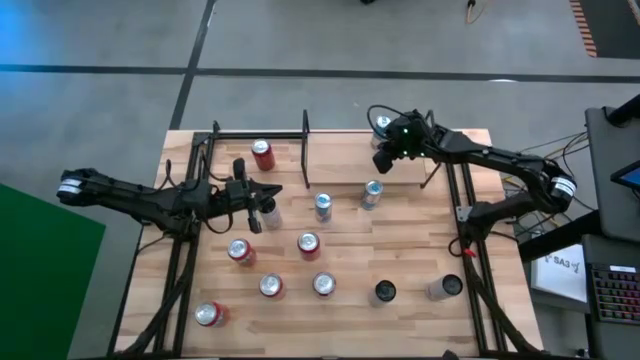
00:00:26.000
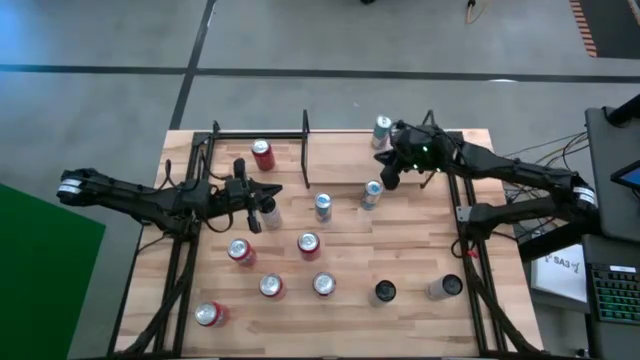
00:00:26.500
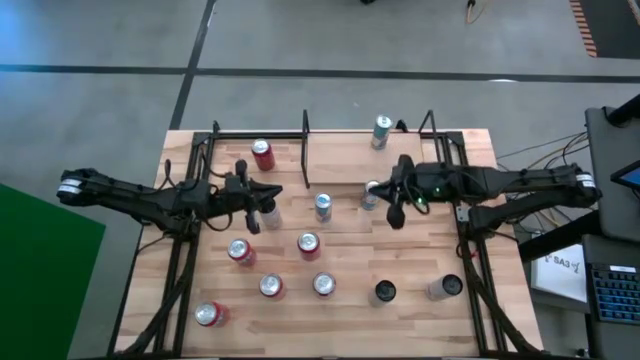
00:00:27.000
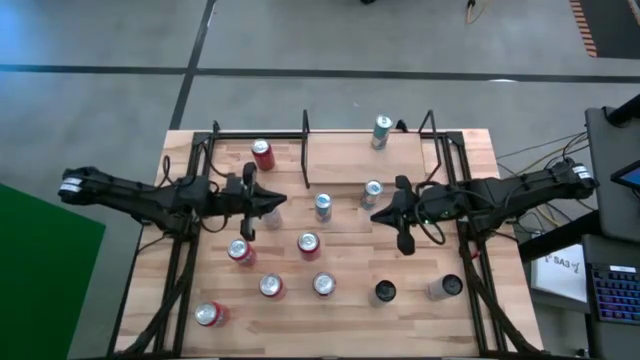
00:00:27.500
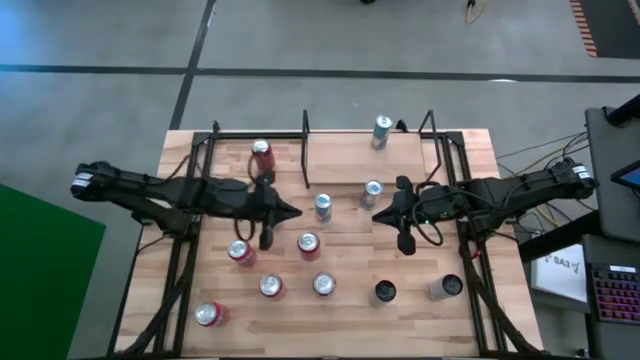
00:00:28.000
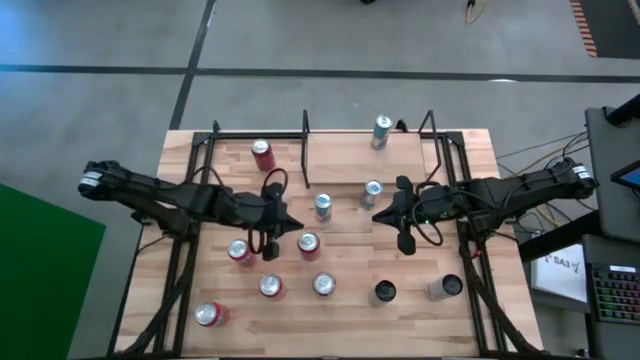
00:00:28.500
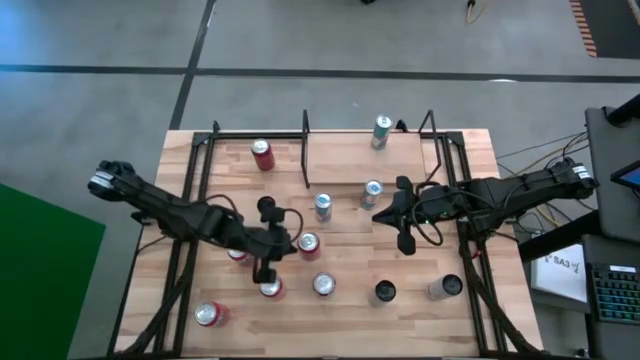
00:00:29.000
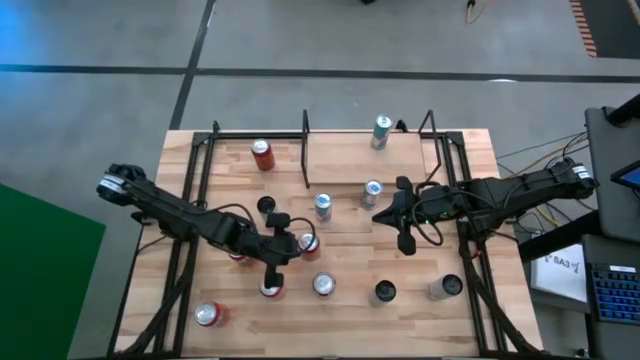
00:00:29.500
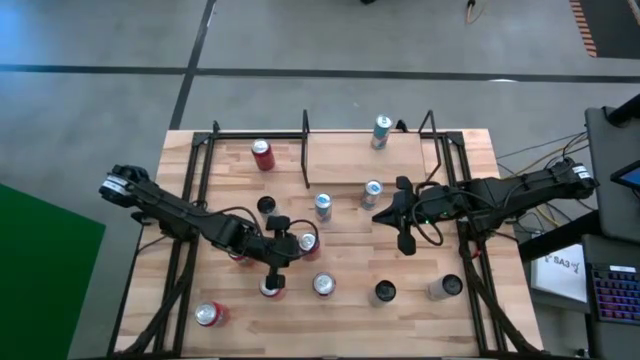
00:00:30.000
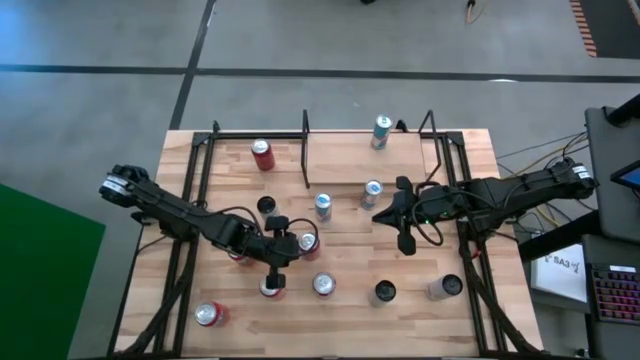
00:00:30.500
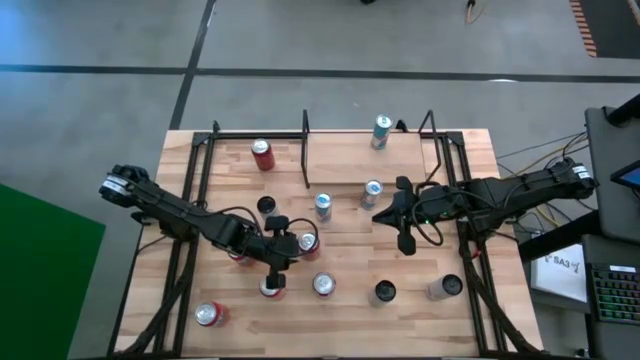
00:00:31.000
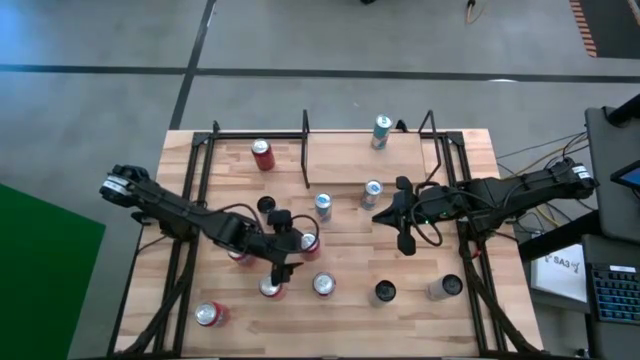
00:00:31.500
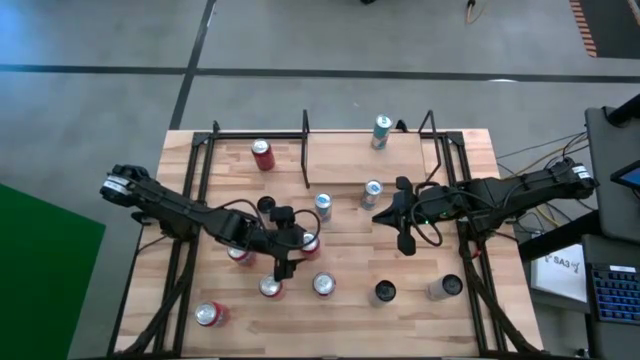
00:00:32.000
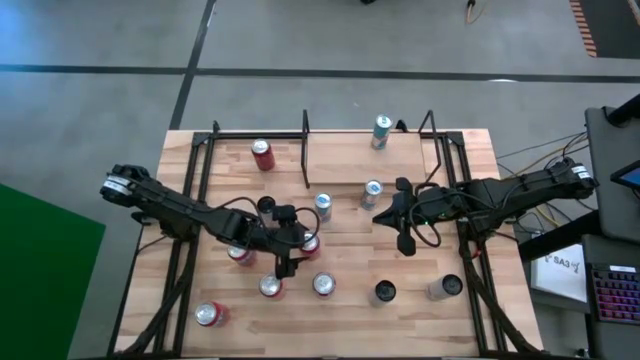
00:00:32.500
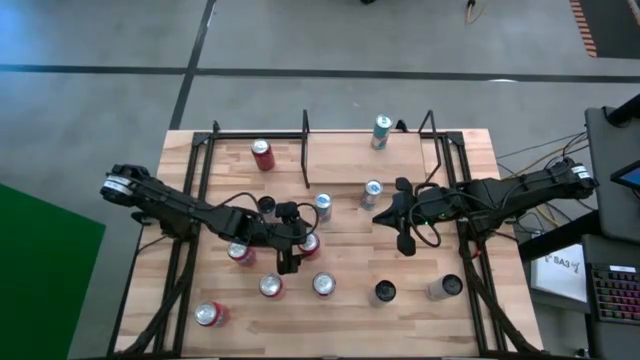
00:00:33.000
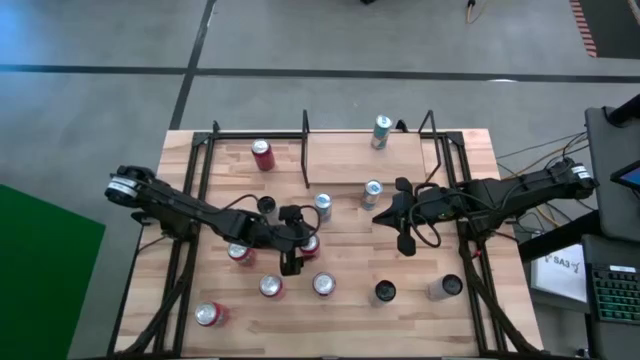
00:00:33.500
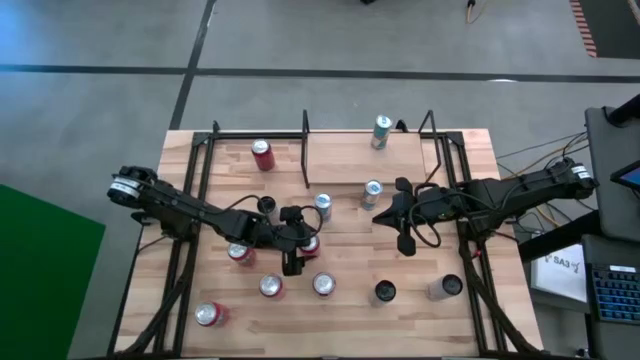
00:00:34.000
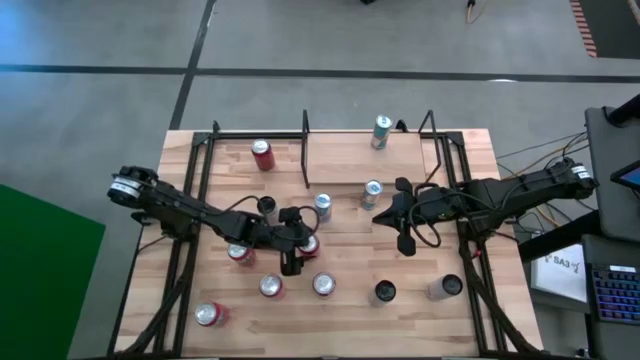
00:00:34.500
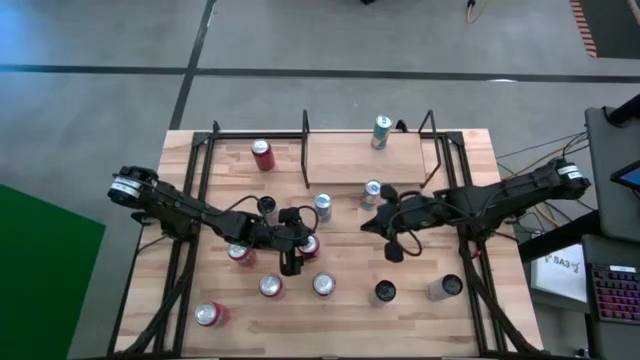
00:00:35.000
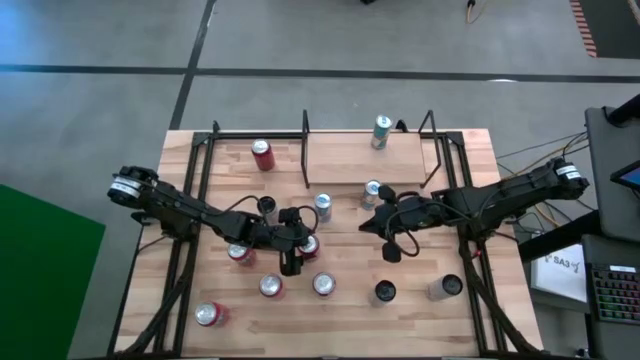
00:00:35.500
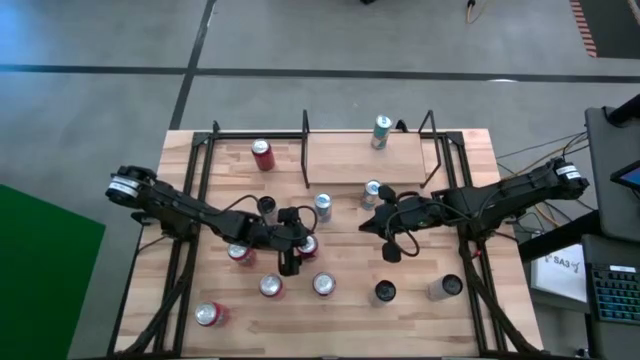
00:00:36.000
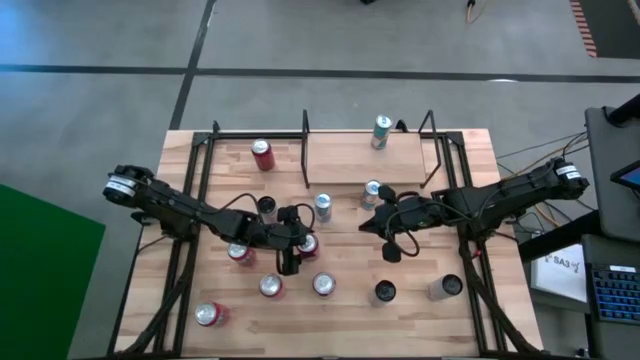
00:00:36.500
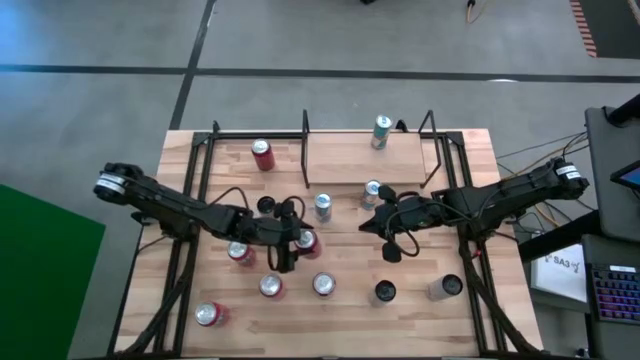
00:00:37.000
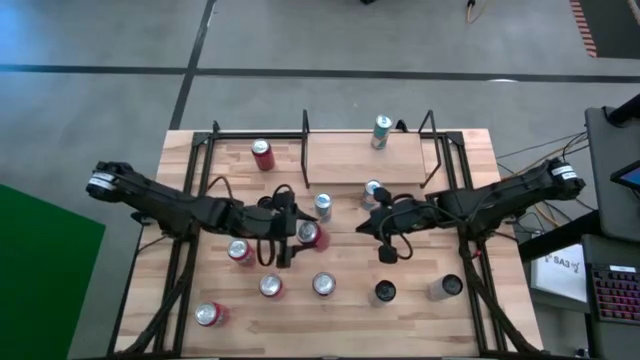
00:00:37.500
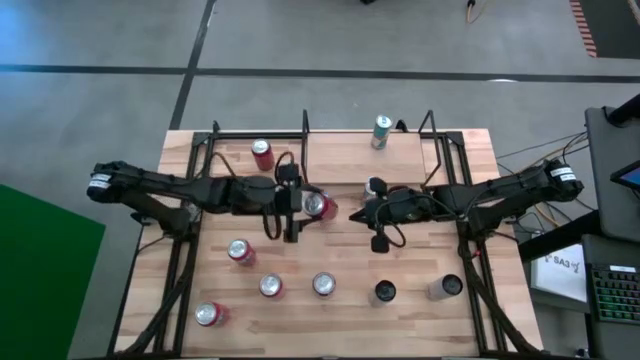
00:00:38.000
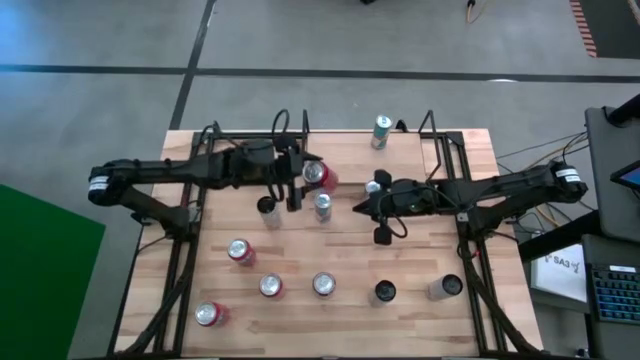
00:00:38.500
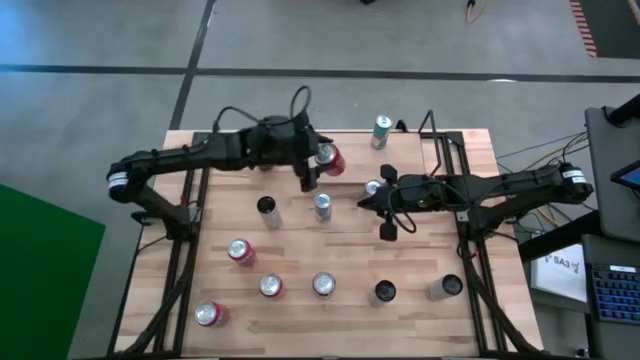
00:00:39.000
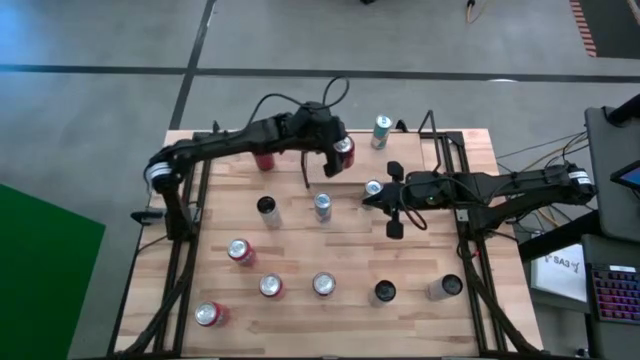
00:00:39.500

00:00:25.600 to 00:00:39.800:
Task: Place canned beverage on shelf
Put the red and black soda can on the shelf

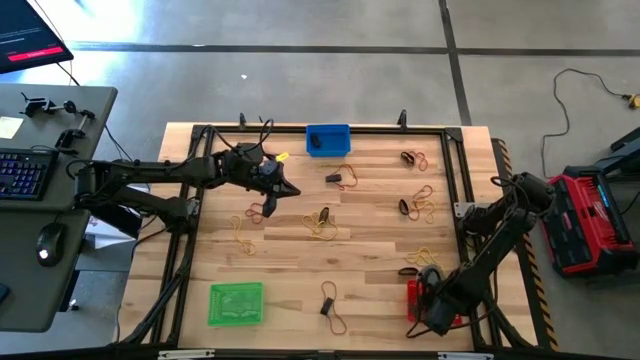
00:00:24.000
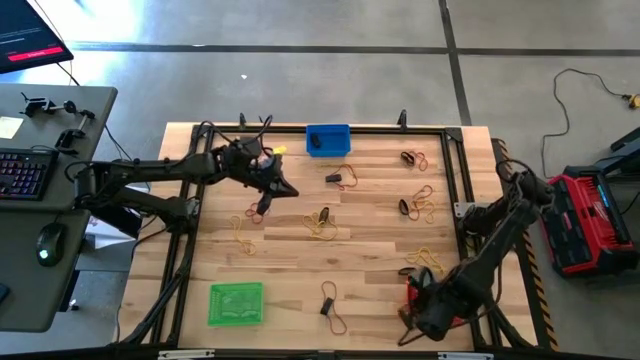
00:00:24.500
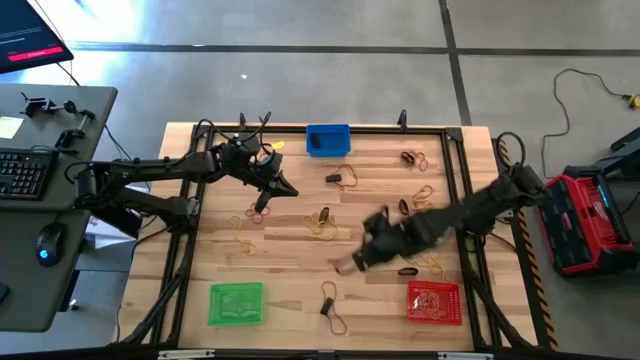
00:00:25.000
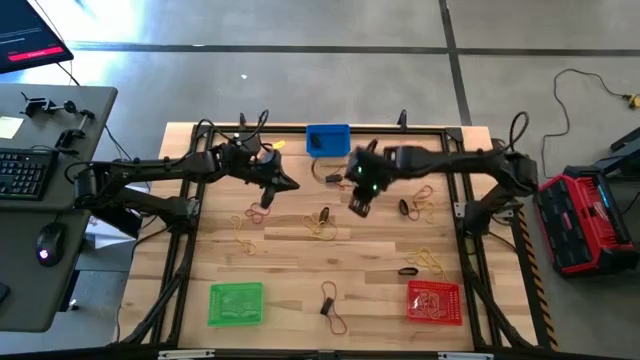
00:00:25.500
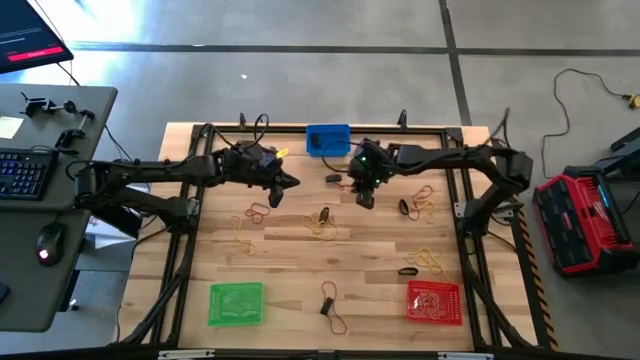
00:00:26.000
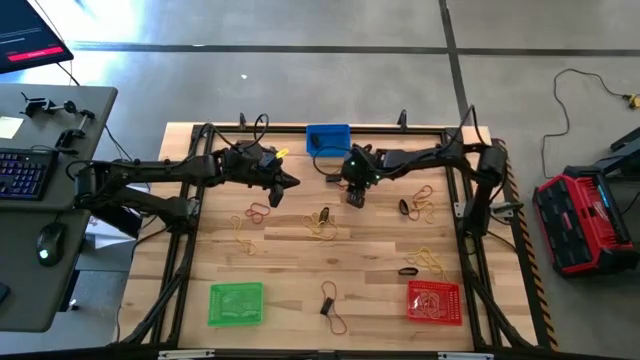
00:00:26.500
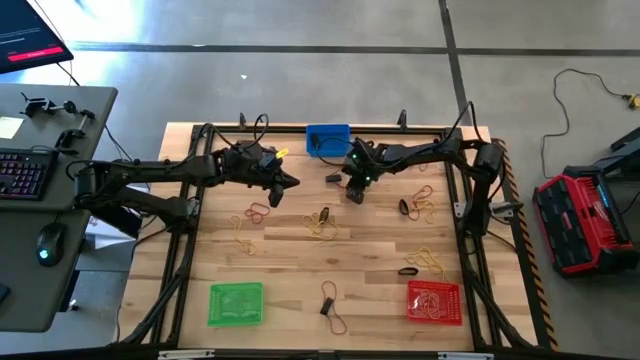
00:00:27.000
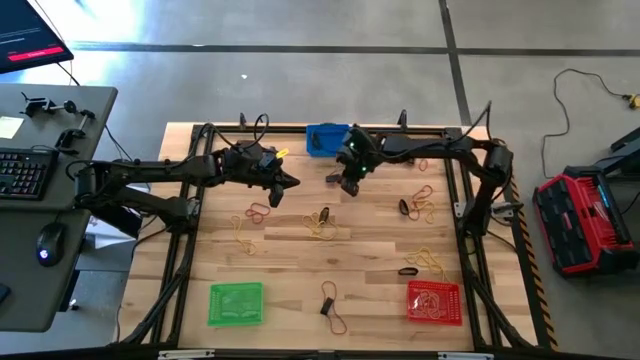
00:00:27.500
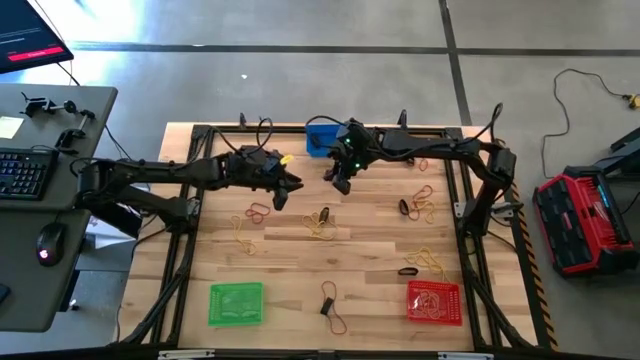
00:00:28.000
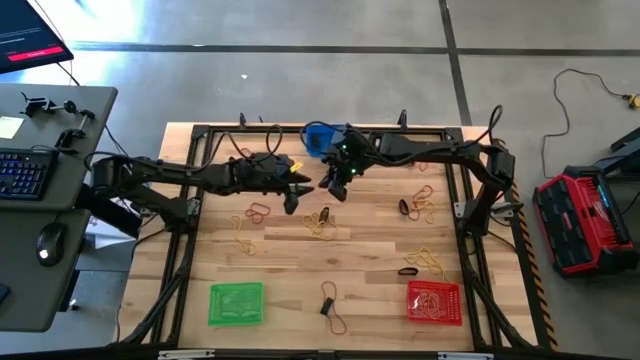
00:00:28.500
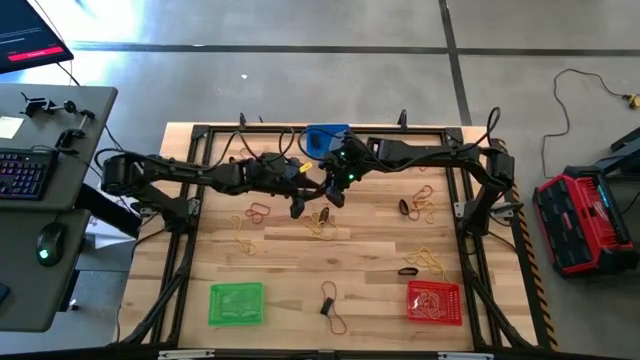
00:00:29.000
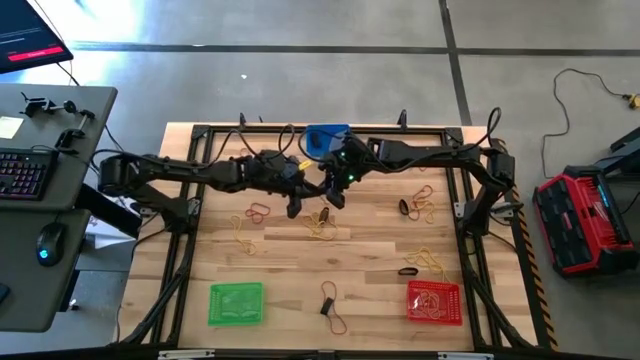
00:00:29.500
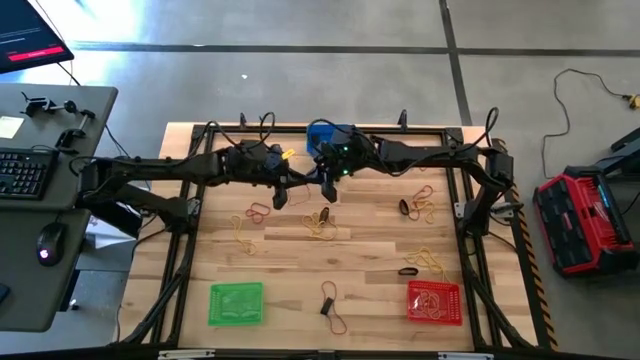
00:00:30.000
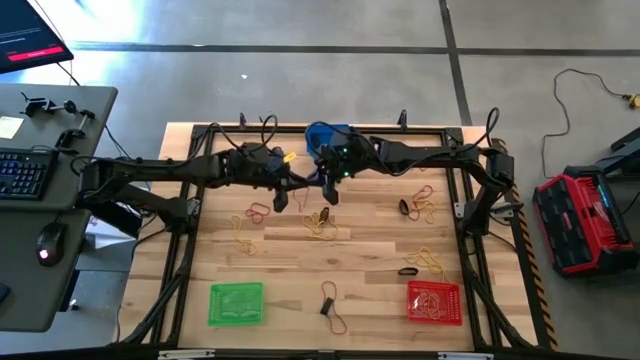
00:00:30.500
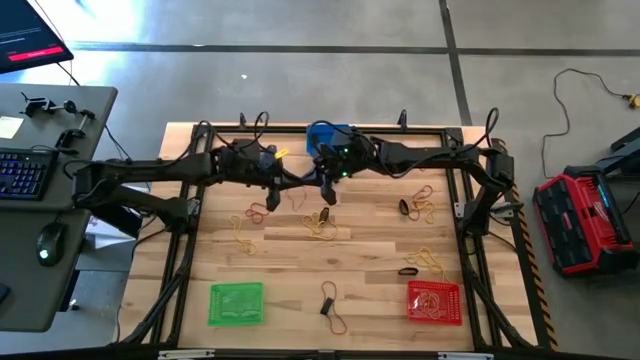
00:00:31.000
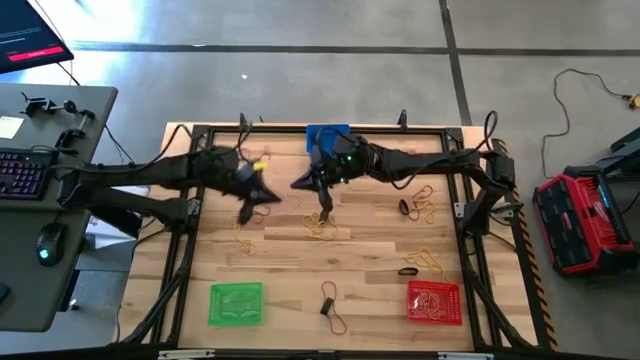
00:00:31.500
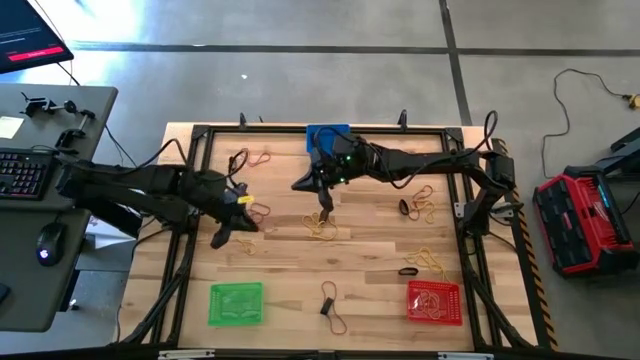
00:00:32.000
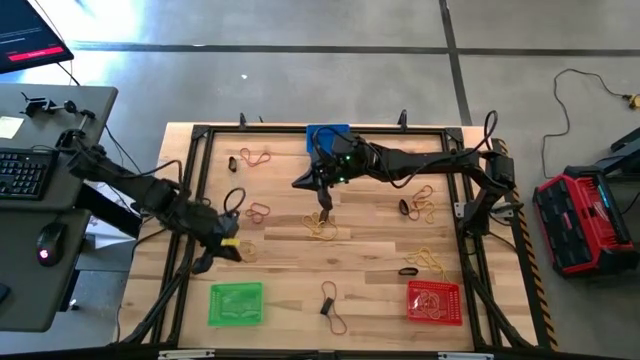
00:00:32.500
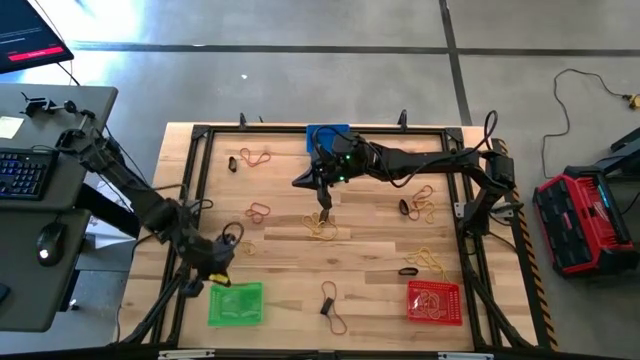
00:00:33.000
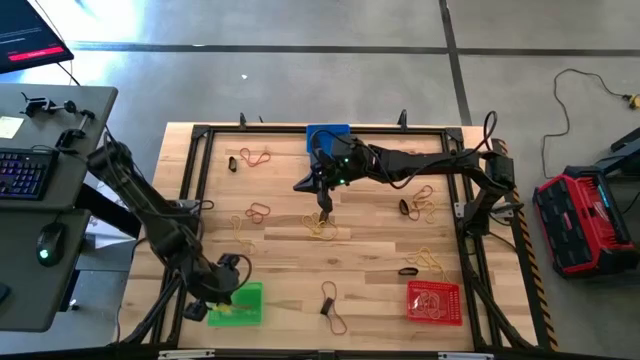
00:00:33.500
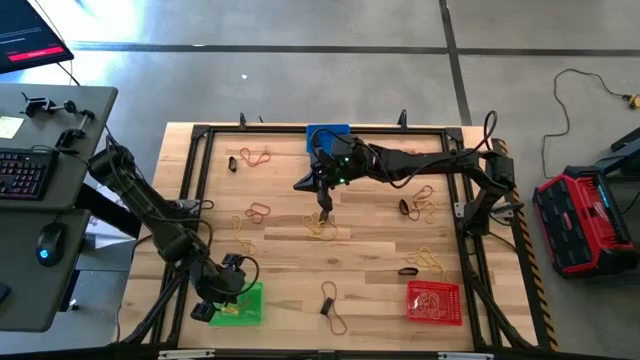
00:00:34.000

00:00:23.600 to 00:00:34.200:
Task: Sort rubber bands into baskets
Put the red rubber band into the green basket
